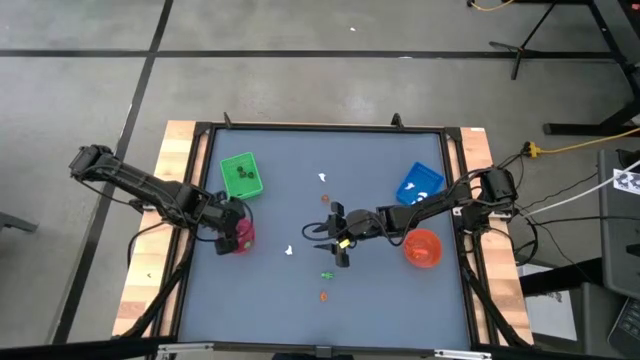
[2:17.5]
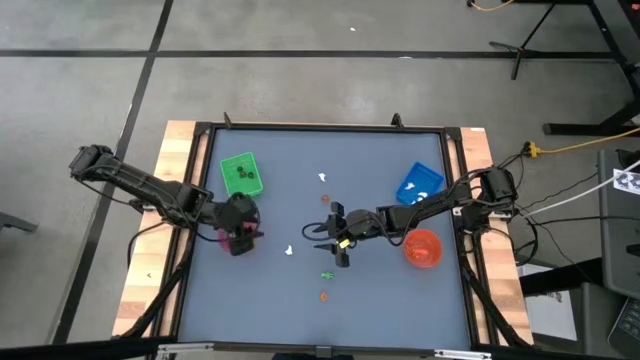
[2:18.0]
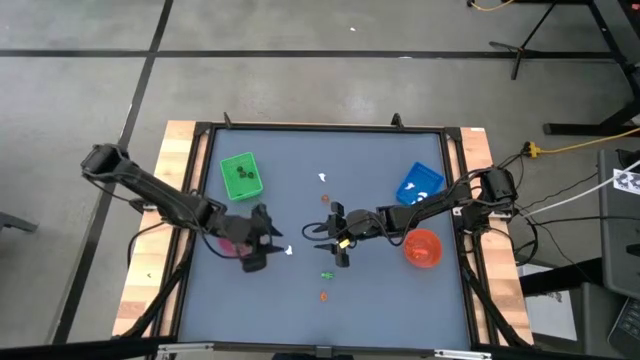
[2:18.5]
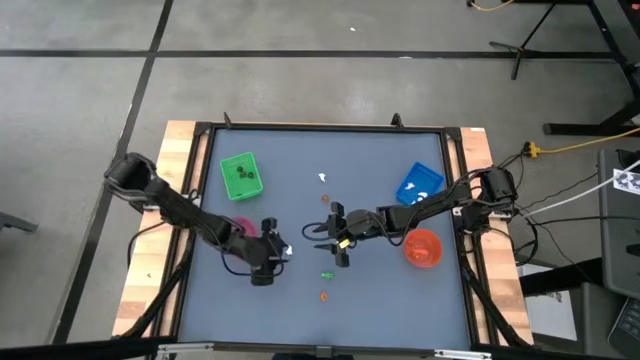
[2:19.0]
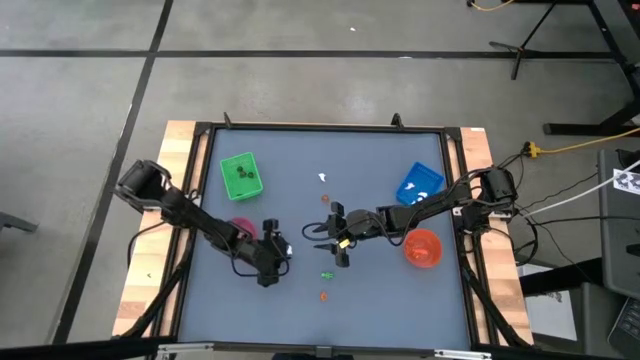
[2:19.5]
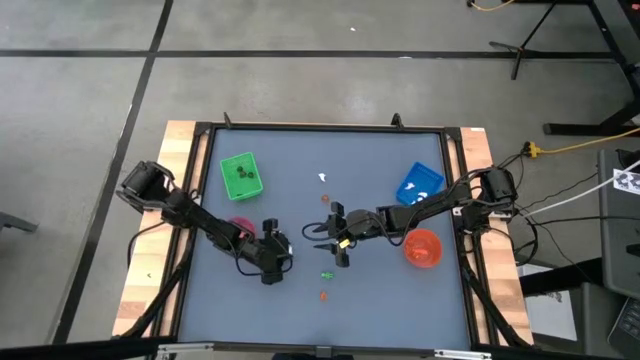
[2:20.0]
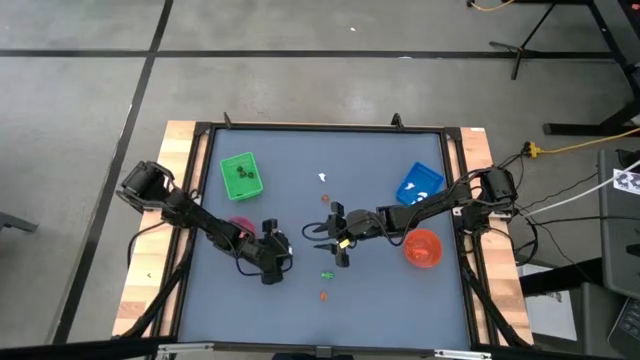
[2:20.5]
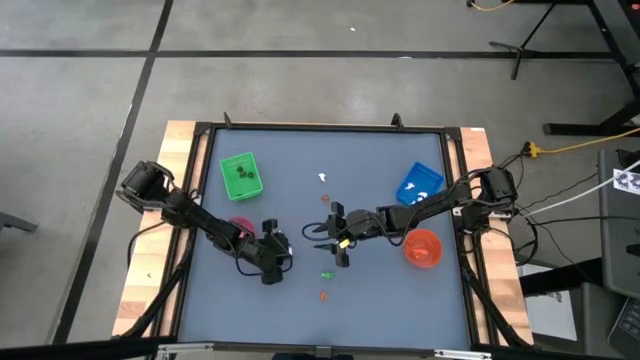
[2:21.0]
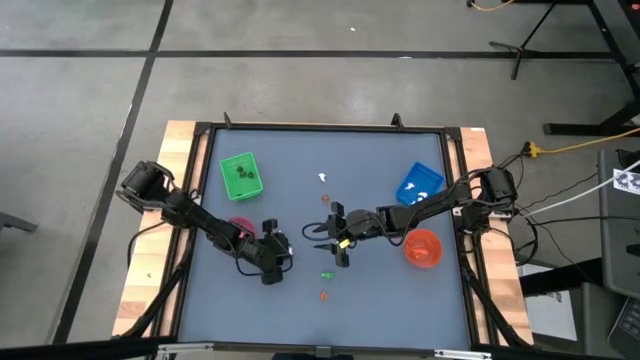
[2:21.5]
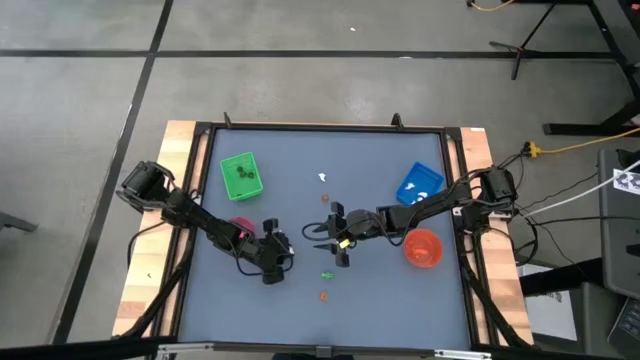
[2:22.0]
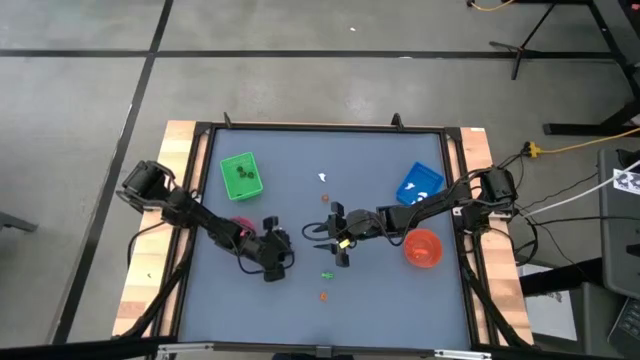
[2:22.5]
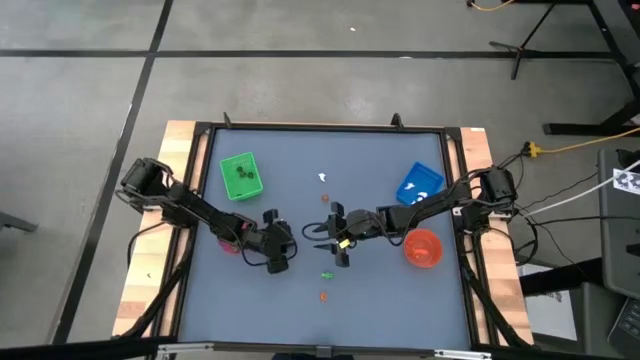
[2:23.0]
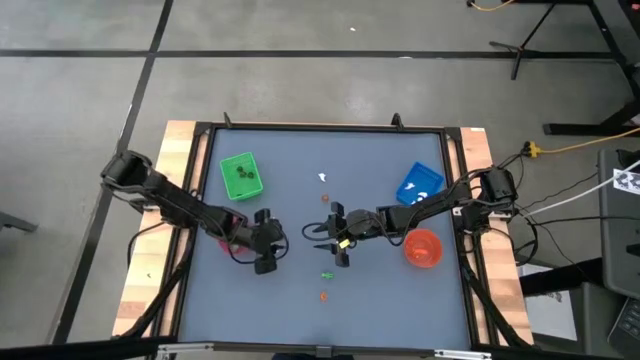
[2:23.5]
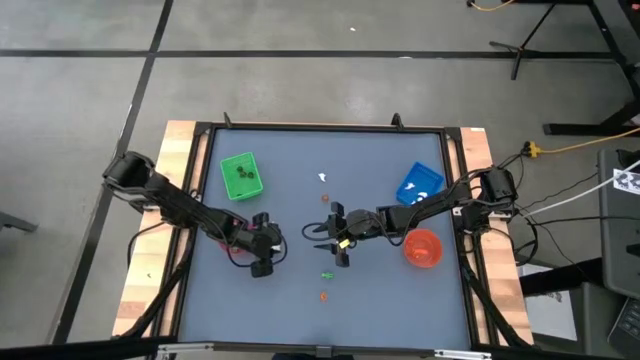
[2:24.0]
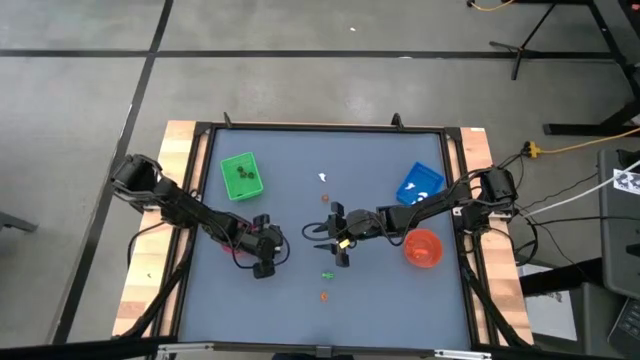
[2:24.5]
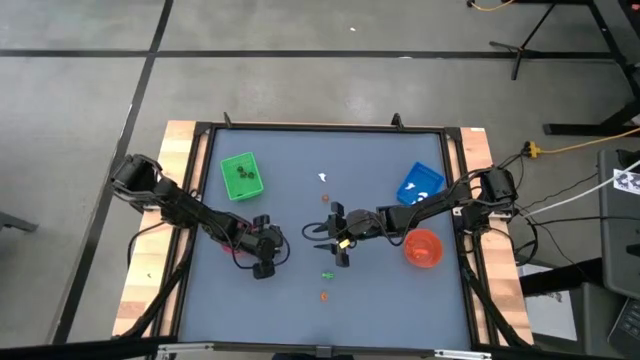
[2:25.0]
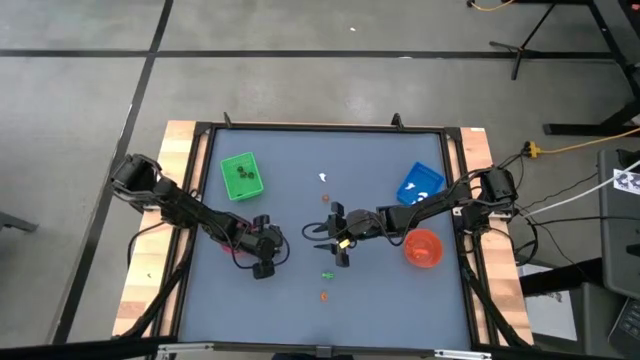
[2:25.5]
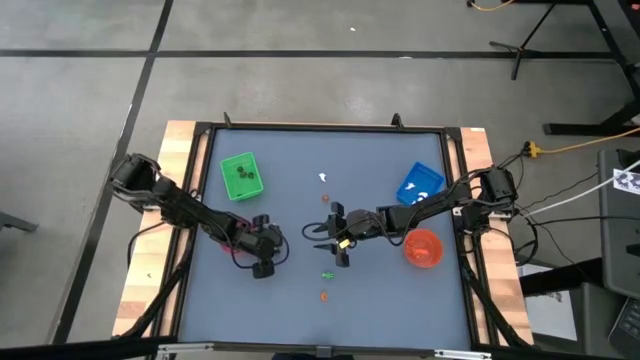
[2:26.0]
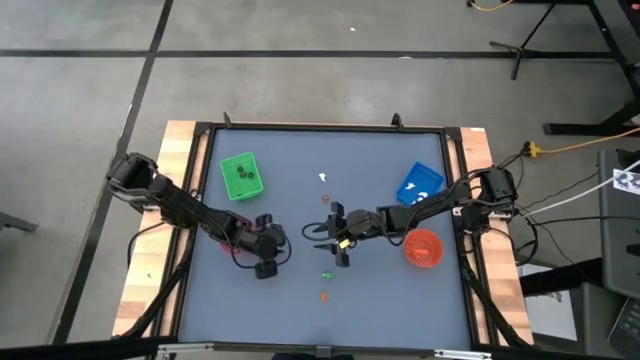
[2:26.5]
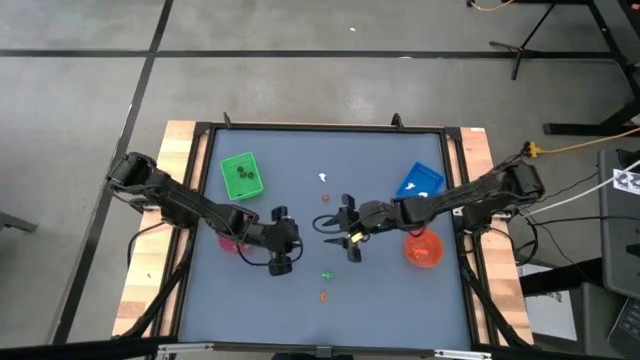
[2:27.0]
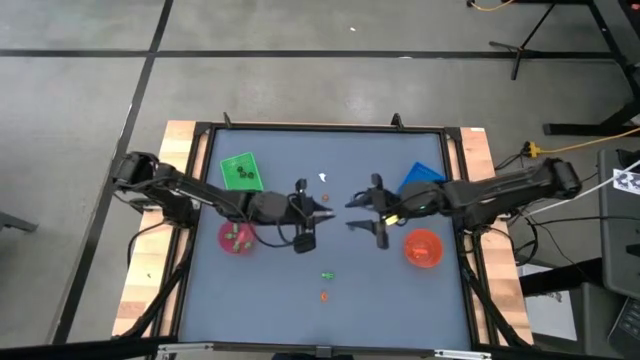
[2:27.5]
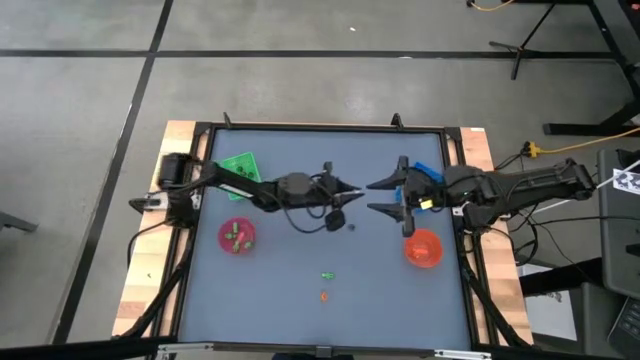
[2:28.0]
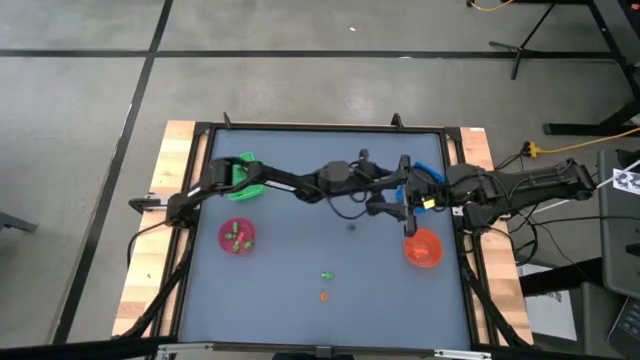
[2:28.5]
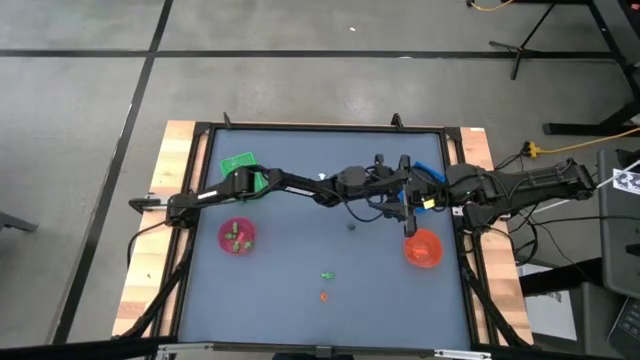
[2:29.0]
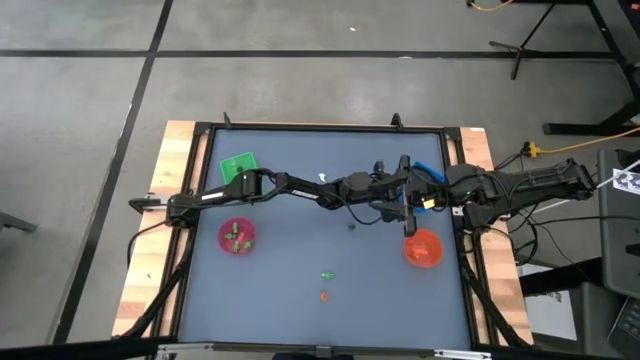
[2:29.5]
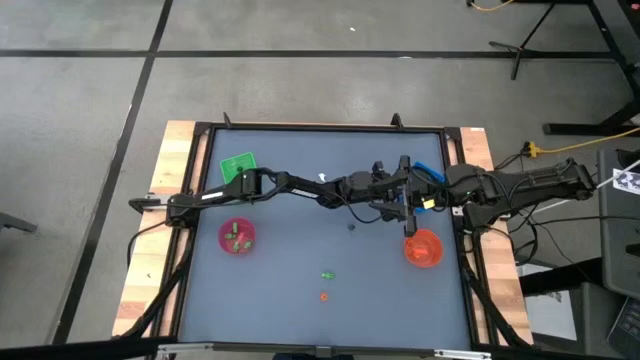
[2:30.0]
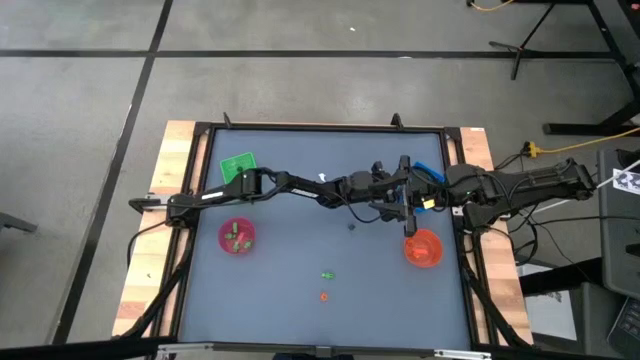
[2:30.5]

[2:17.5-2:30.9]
Task: Sort Halloween decoration
Put the small white ghost toy into the blue basket

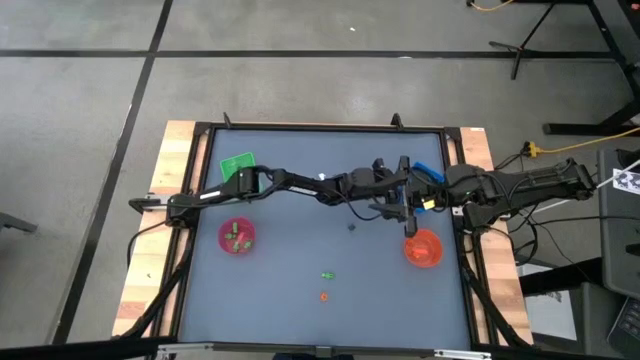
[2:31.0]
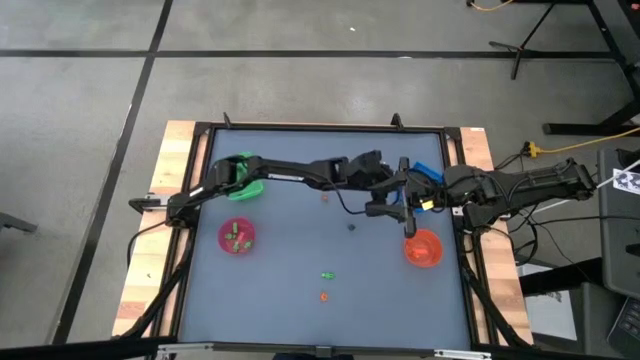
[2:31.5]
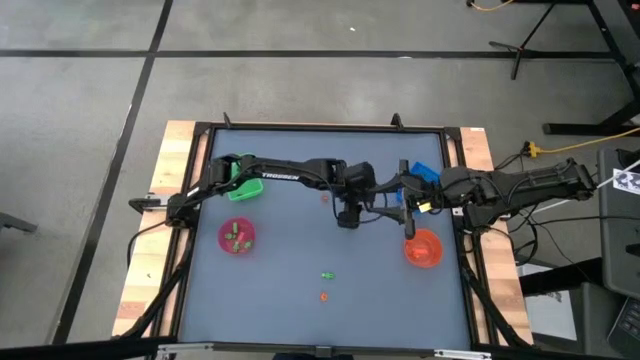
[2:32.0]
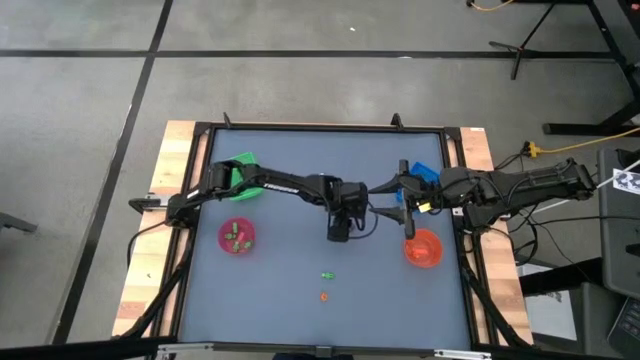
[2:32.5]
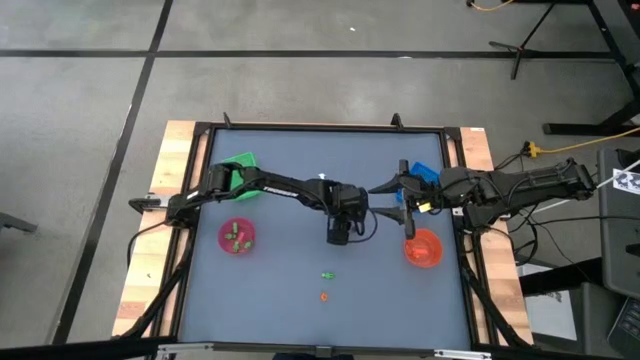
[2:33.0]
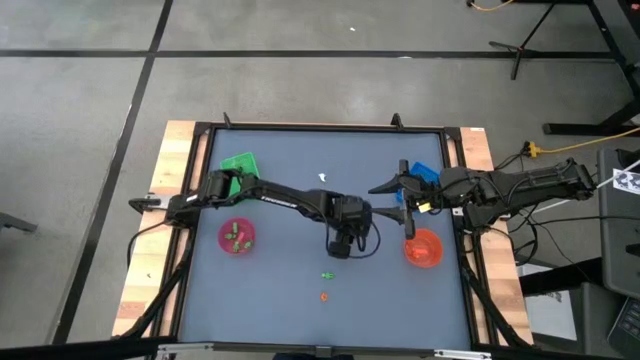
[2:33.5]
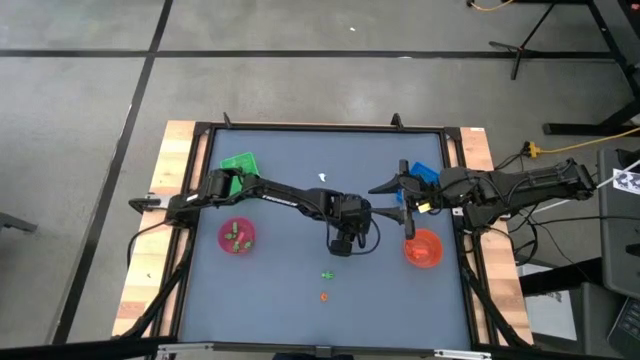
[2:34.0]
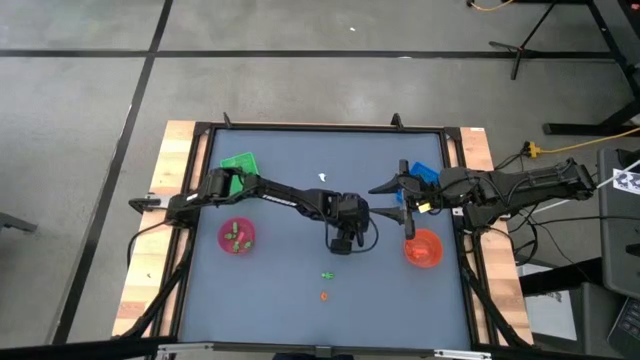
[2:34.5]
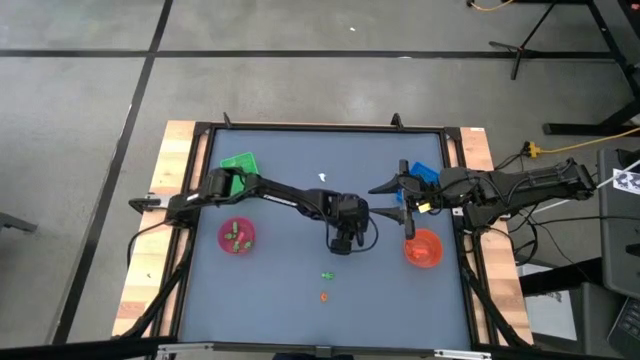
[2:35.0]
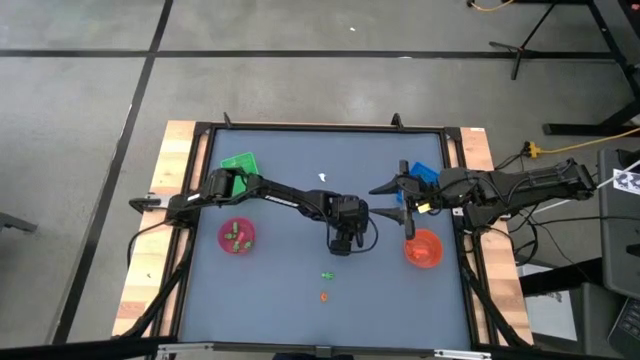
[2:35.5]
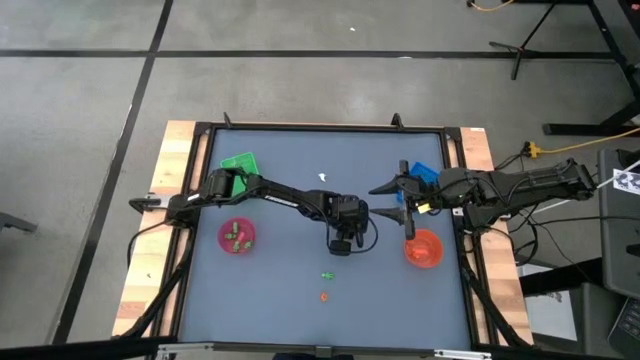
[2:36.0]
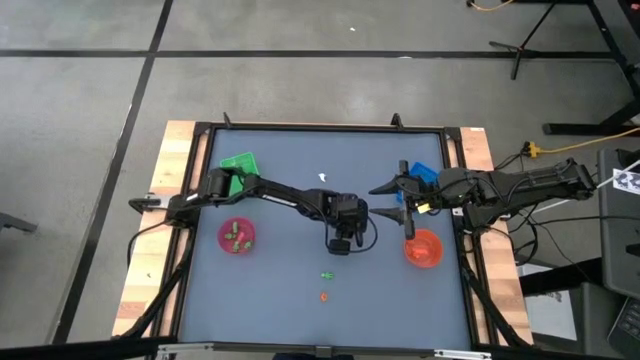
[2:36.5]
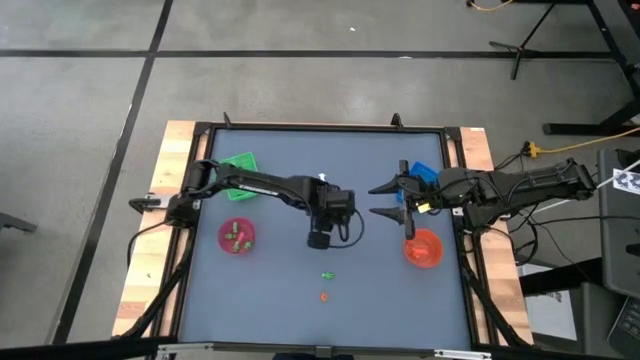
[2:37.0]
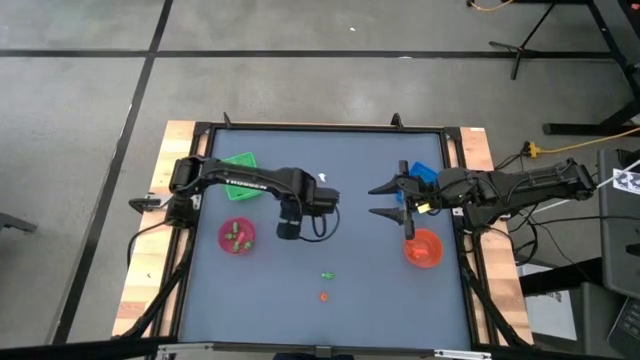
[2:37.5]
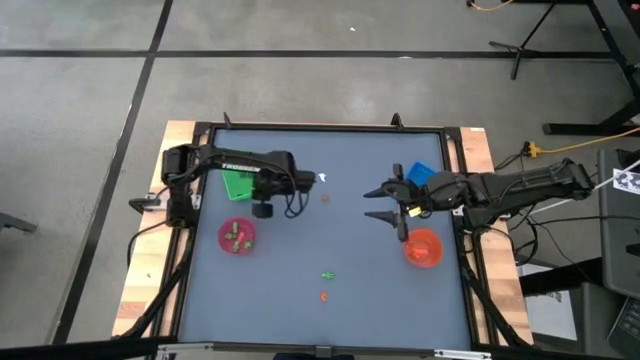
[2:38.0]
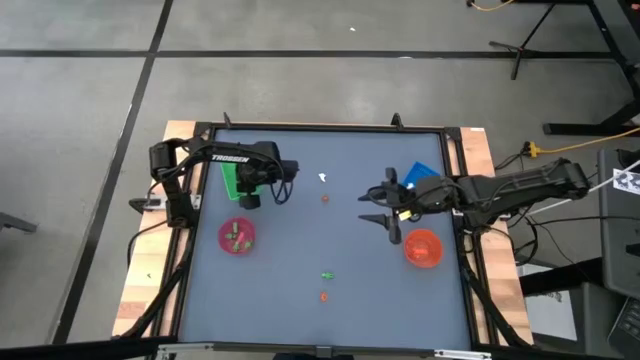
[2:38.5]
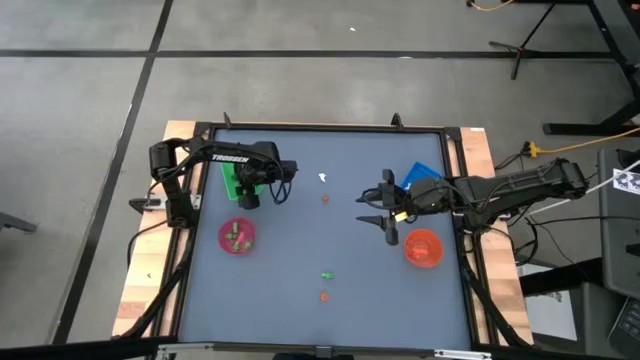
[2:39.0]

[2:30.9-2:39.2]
Put the small black skull toy into the green basket
